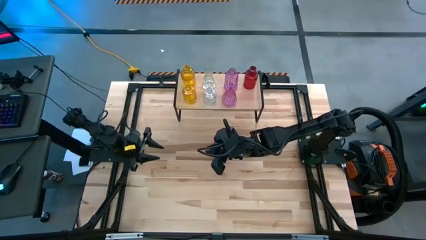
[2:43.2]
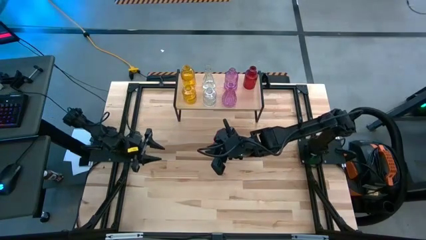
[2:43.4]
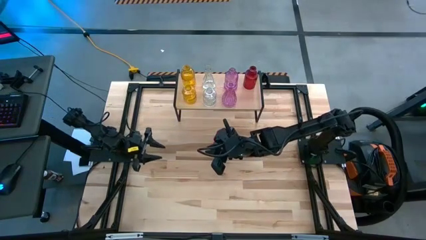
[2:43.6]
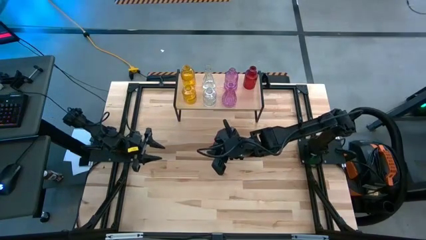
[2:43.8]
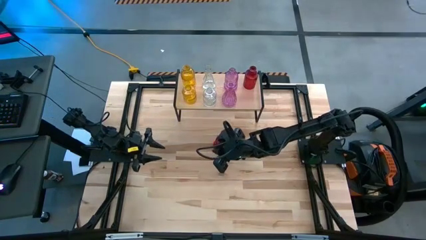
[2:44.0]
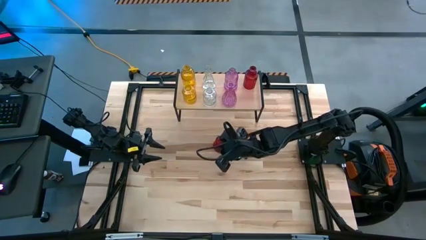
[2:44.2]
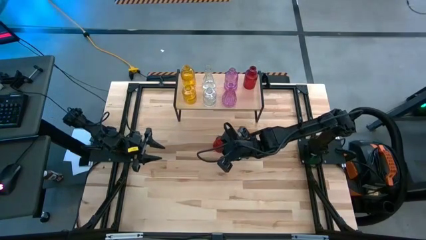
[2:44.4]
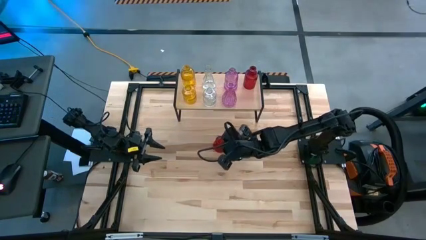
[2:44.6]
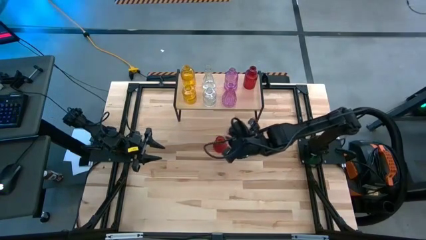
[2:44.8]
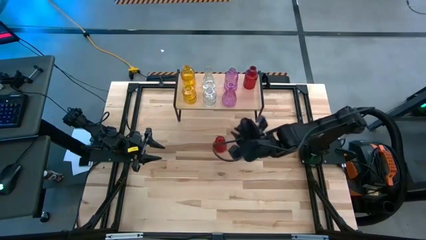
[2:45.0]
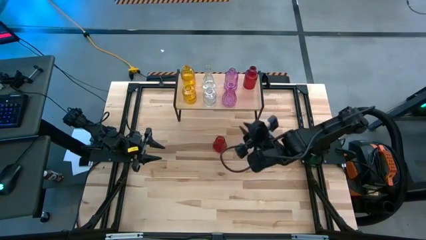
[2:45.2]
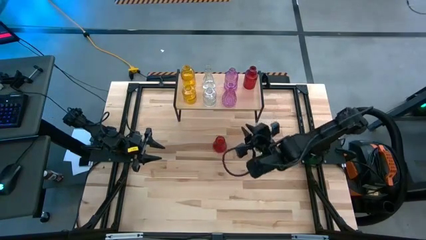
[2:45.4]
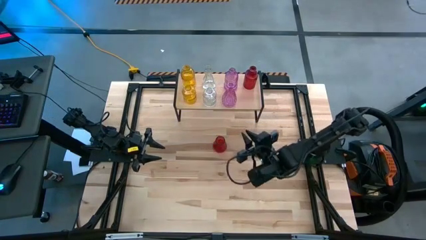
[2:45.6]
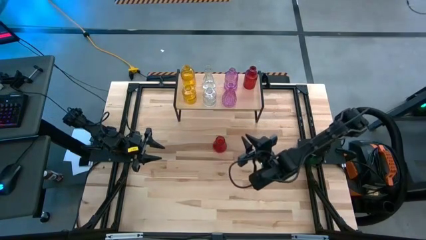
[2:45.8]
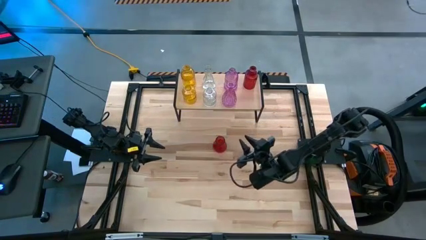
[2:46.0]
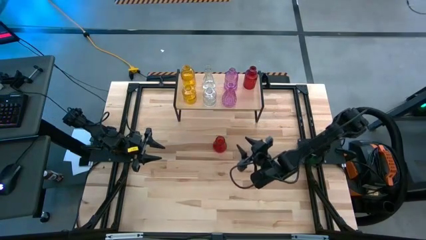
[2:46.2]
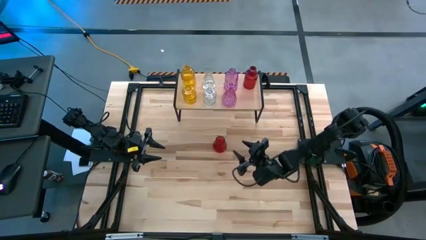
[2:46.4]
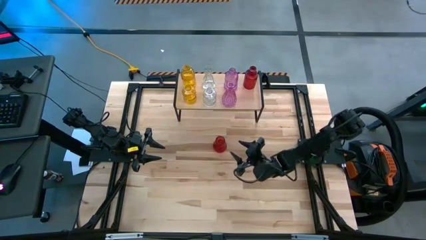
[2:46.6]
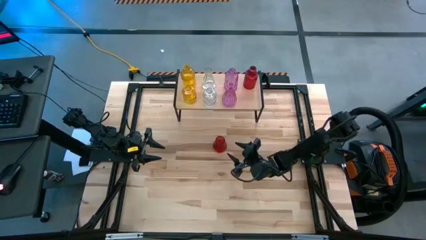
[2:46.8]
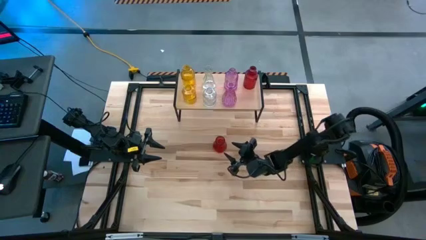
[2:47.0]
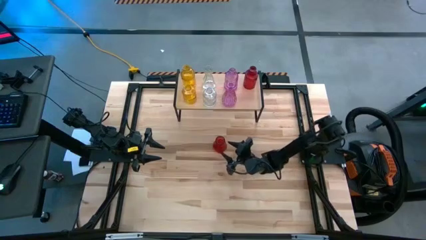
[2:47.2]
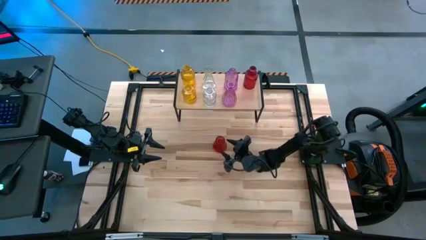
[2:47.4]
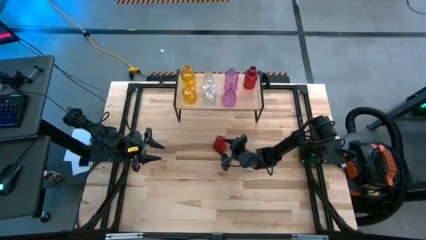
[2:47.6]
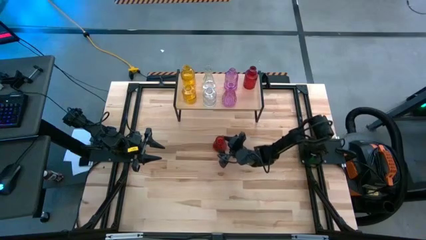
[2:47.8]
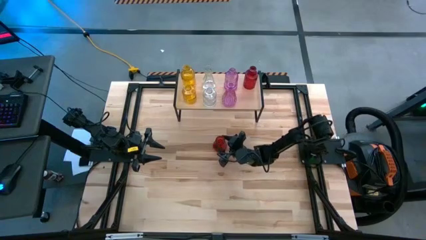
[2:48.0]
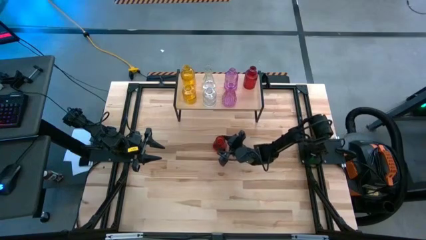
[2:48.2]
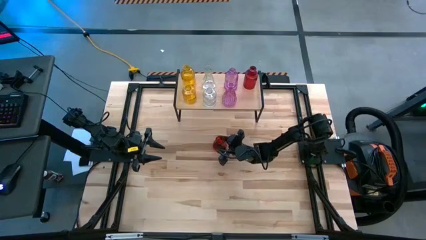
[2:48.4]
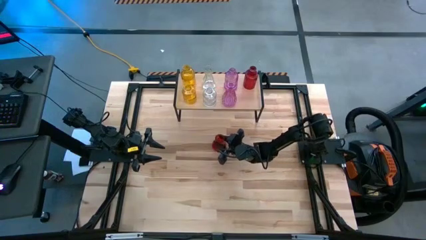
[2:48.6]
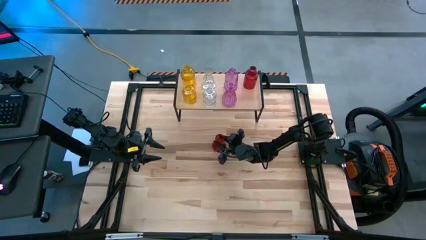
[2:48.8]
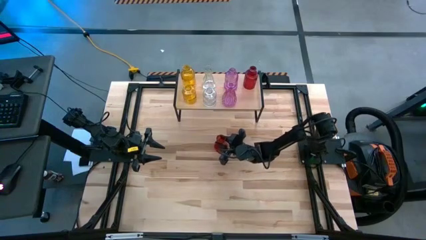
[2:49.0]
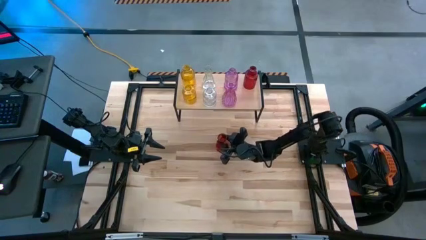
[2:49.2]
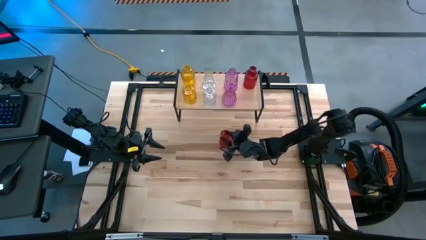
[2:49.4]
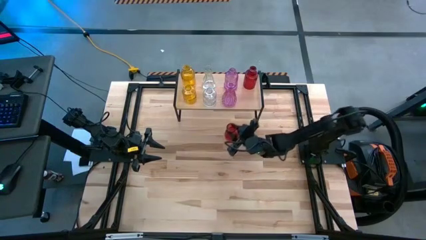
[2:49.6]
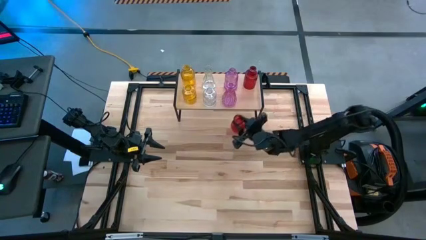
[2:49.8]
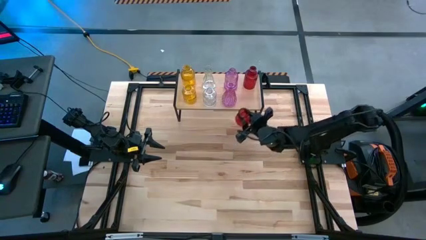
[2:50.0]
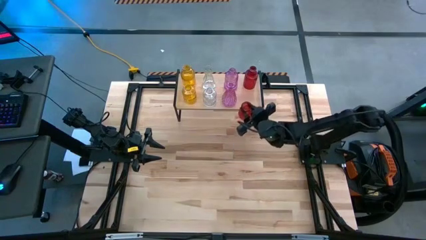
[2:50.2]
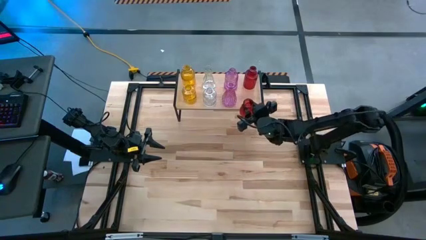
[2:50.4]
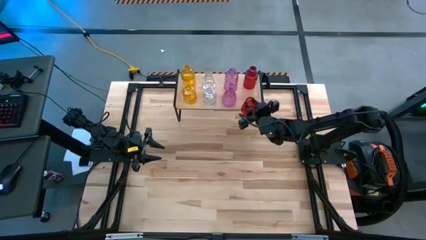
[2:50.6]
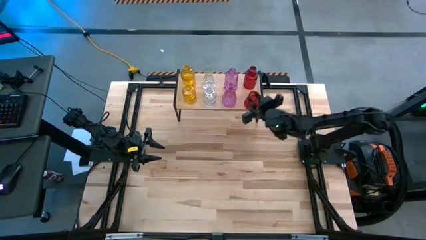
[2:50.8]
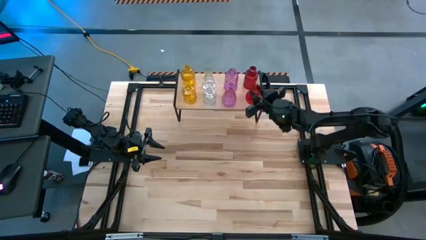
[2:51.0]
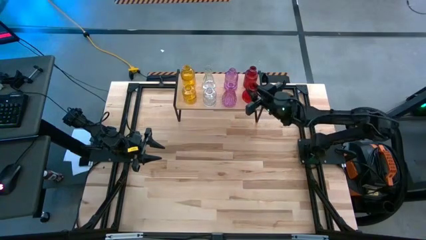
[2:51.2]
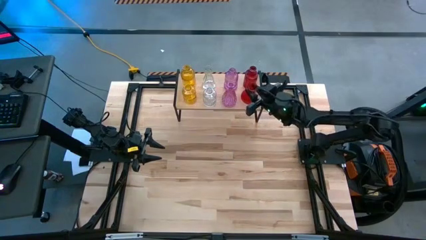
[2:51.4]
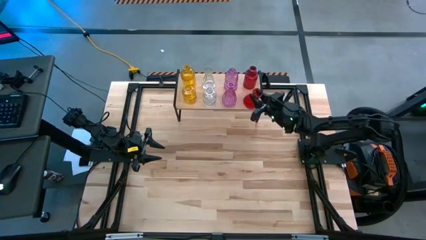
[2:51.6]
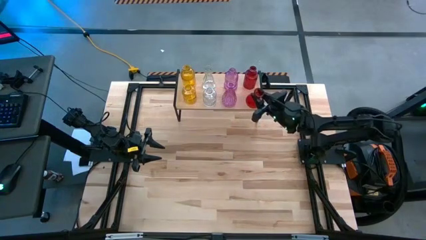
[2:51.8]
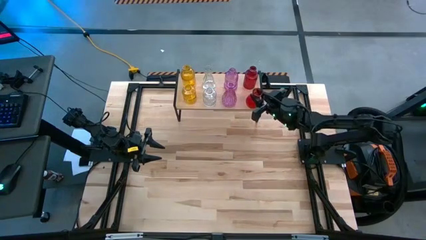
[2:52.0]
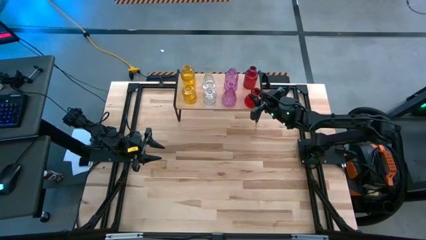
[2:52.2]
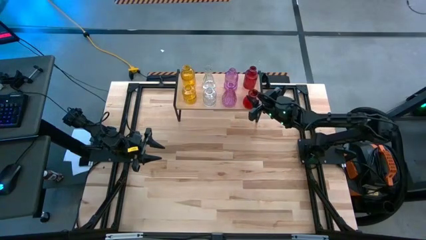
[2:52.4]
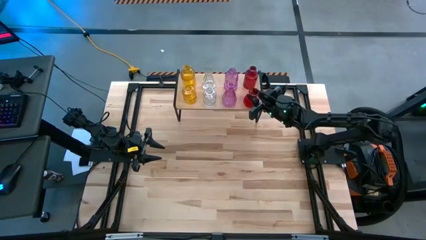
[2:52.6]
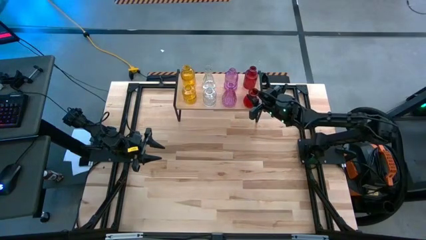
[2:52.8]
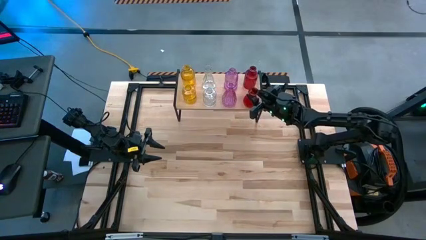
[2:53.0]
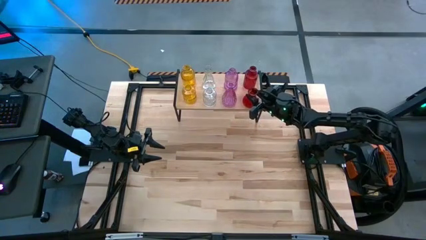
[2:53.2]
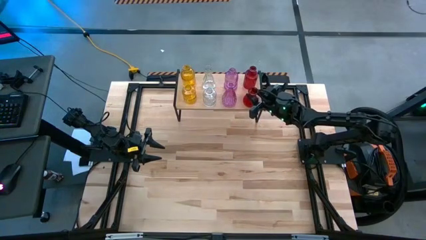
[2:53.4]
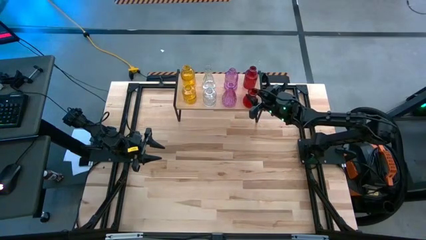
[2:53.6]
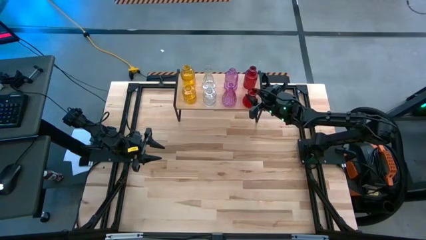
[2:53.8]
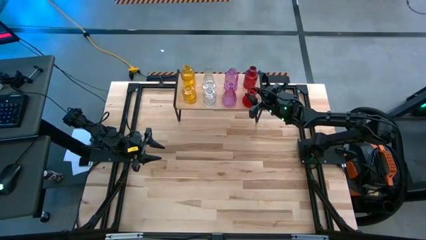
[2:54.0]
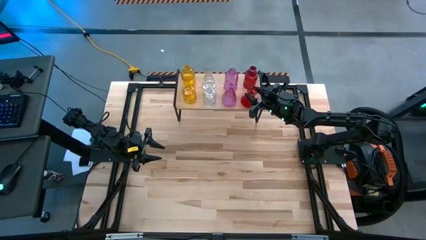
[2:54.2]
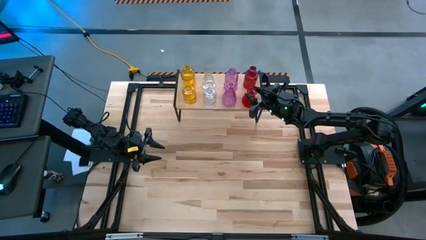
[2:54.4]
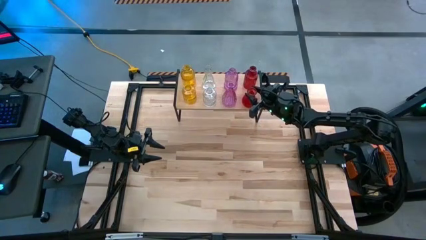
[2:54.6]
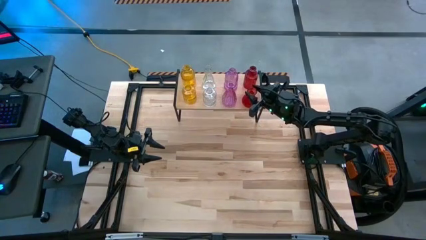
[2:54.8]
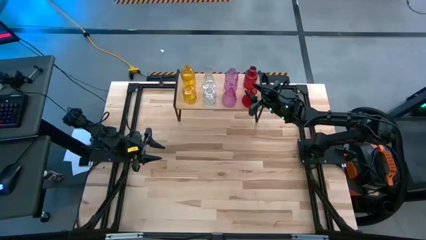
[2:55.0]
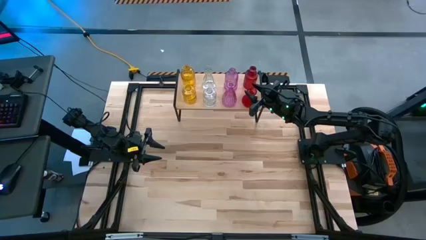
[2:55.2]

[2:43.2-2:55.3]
Task: sort vases onto shelf
Put the red vase on the shelf aligned with the other red vase

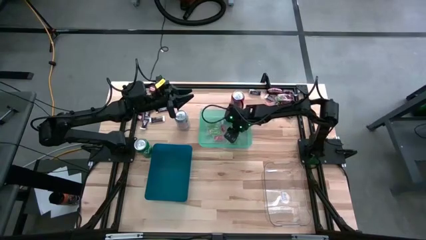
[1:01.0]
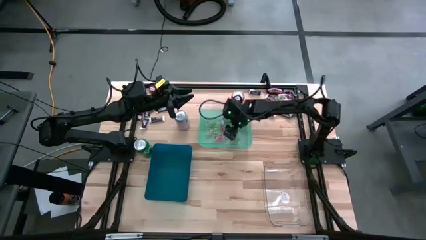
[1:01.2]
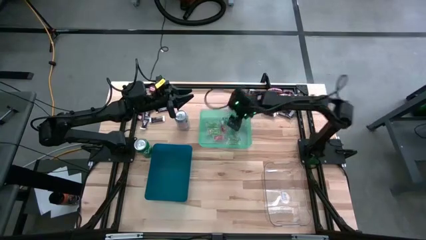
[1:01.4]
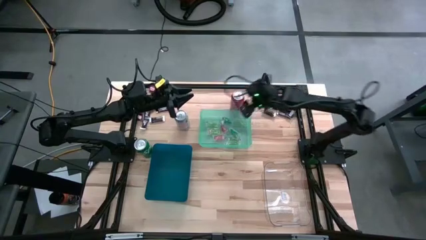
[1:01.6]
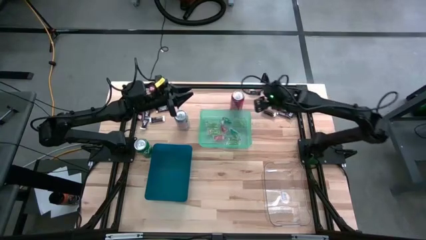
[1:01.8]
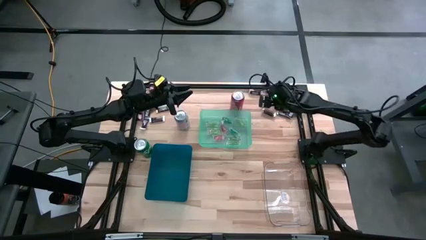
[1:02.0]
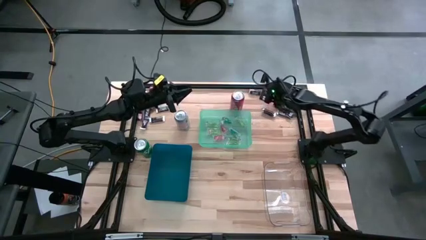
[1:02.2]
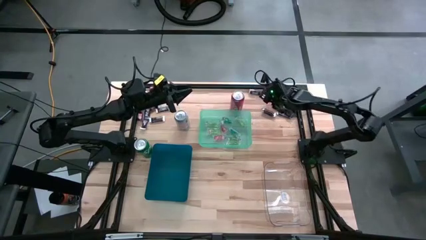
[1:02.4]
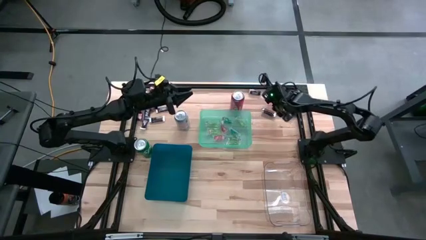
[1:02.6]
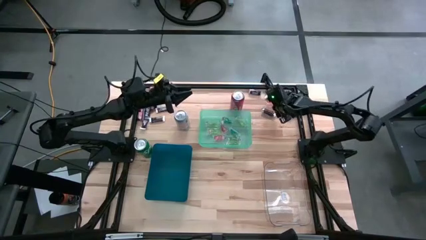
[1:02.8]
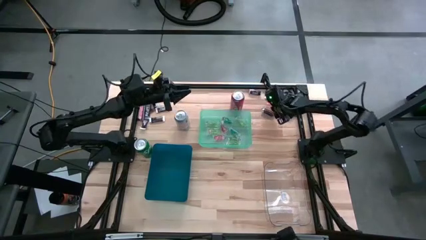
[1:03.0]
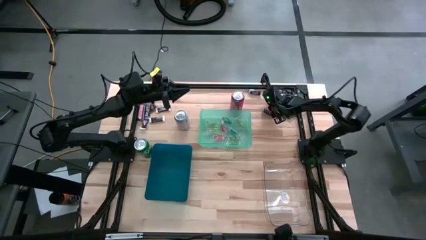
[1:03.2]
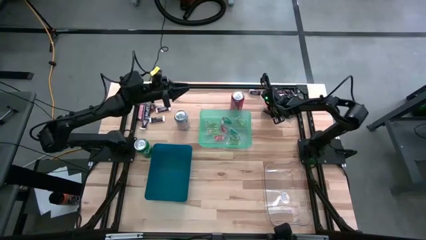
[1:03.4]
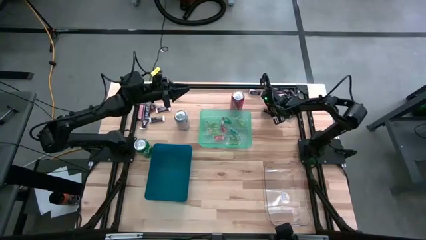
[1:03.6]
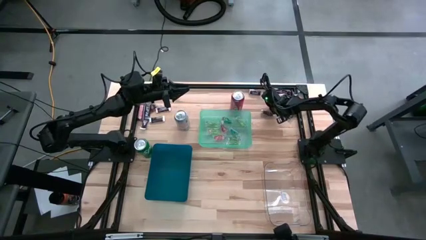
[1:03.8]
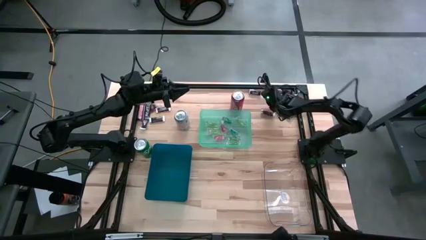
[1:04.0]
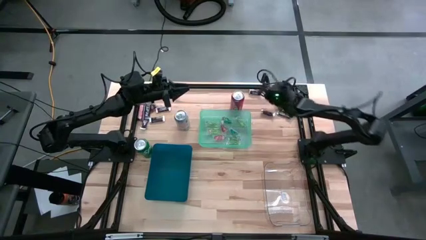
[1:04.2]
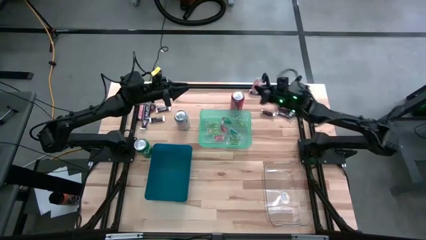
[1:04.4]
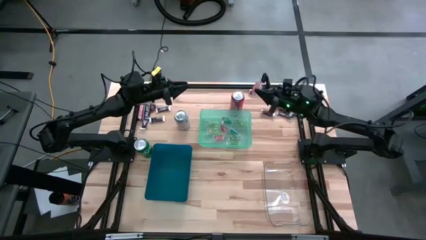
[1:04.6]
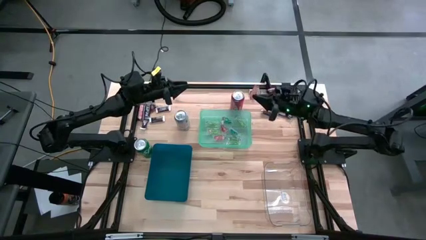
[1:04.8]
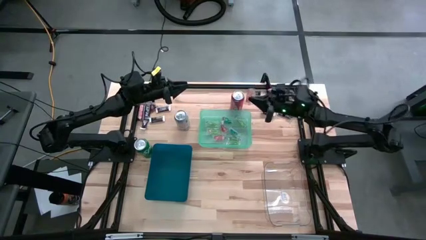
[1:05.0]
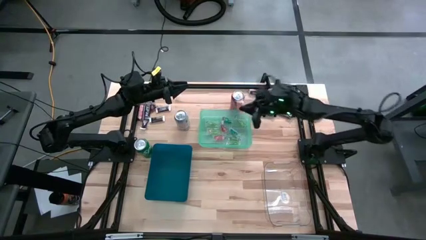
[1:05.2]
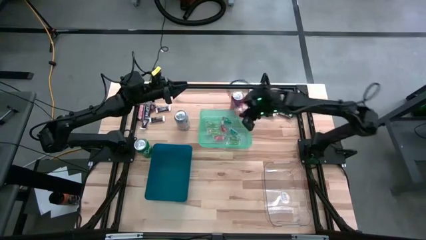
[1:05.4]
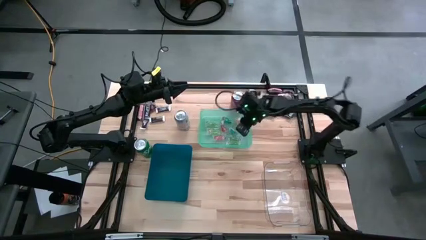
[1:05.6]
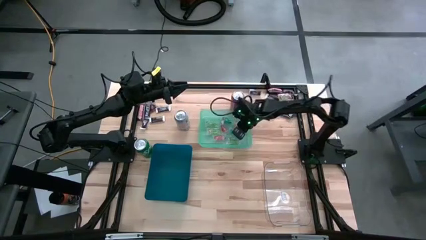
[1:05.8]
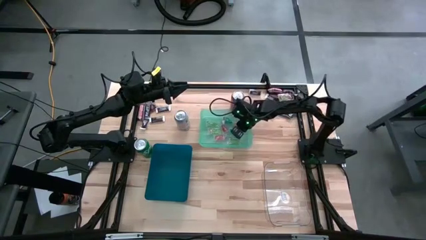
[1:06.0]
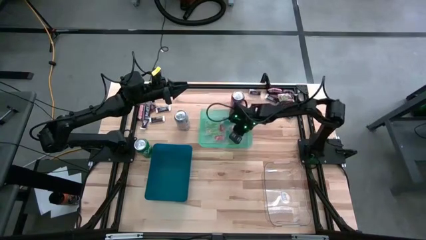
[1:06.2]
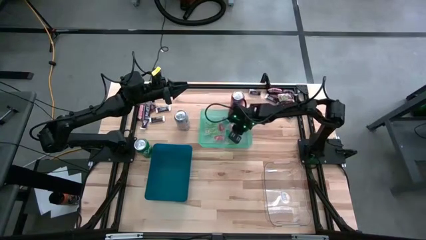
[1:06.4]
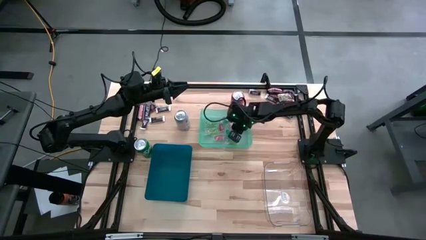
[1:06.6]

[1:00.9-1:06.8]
Task: Organize candy in baskets
Put the orange gummy into the green bin
